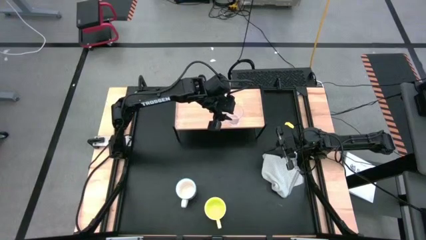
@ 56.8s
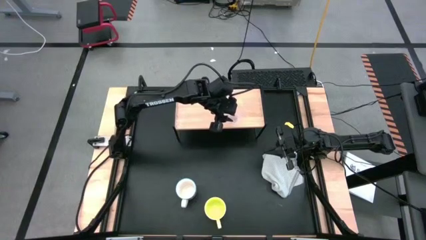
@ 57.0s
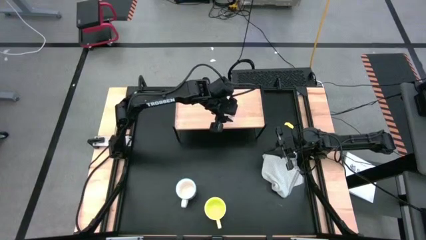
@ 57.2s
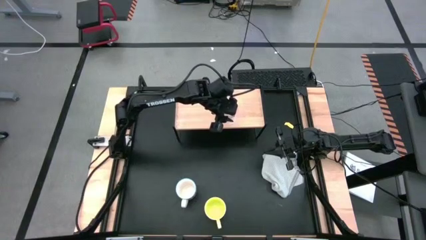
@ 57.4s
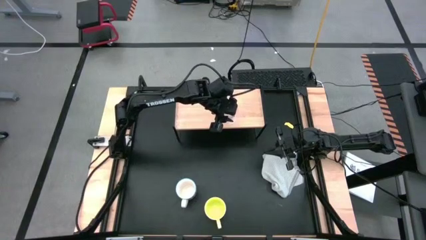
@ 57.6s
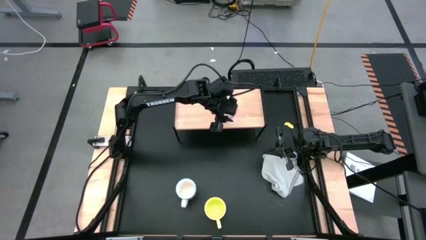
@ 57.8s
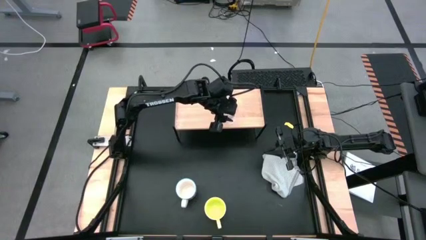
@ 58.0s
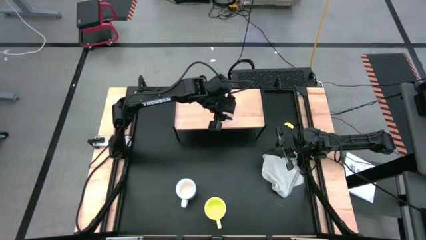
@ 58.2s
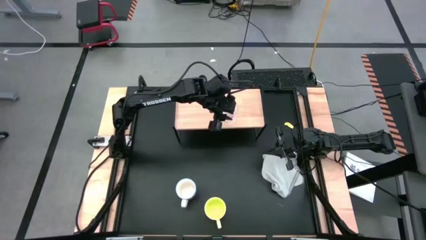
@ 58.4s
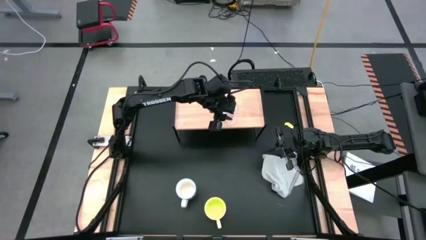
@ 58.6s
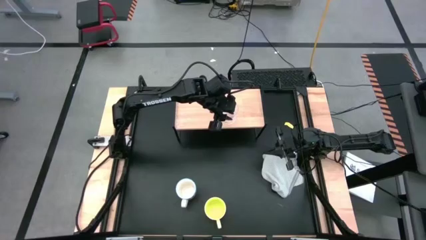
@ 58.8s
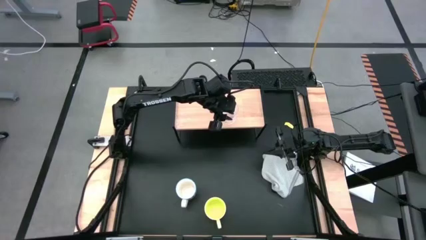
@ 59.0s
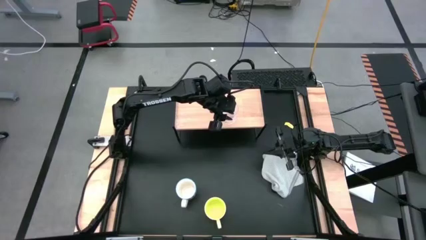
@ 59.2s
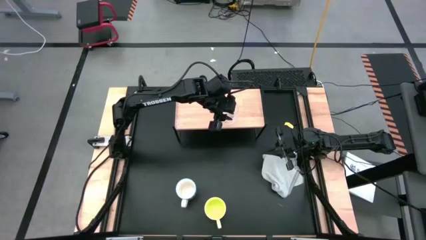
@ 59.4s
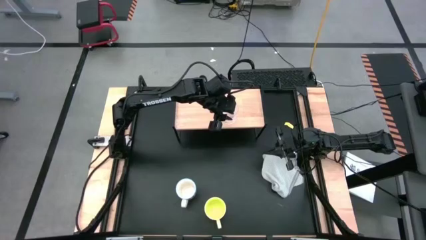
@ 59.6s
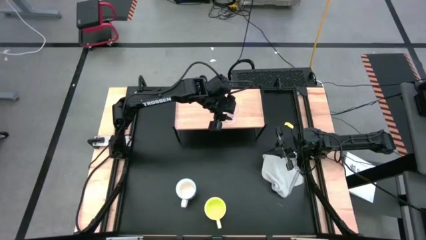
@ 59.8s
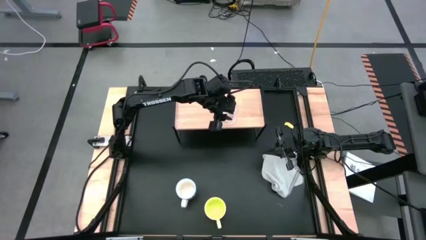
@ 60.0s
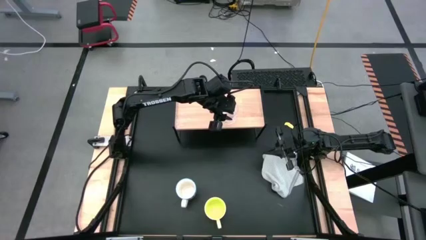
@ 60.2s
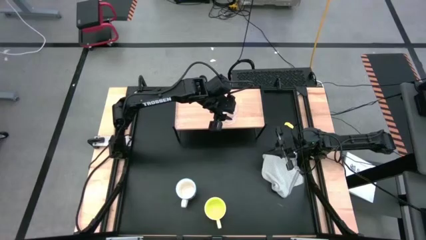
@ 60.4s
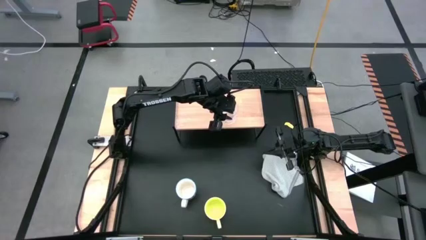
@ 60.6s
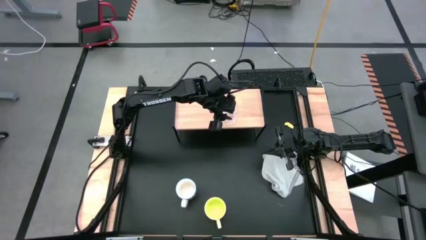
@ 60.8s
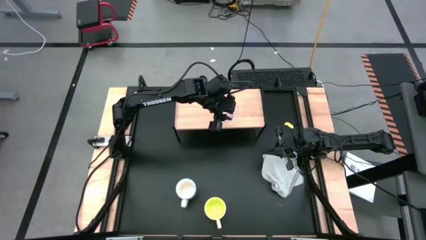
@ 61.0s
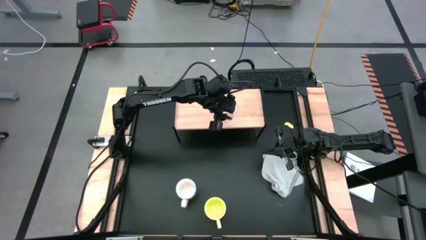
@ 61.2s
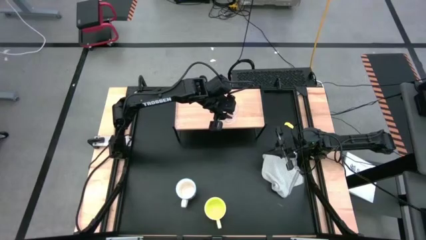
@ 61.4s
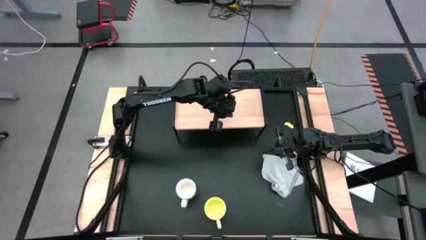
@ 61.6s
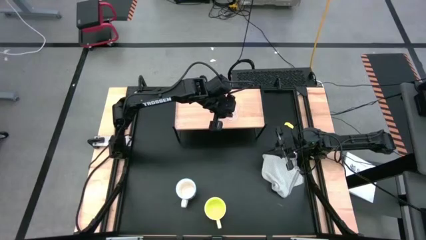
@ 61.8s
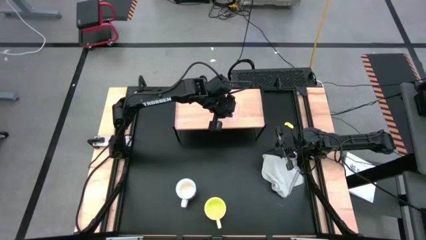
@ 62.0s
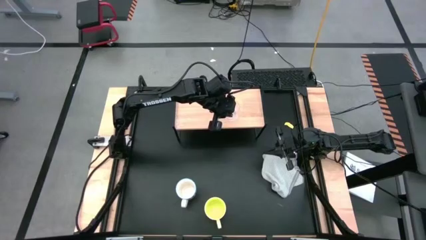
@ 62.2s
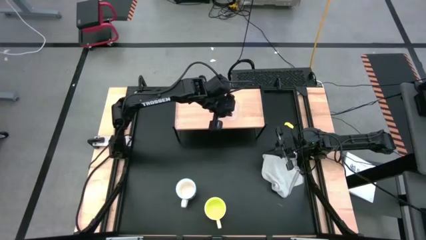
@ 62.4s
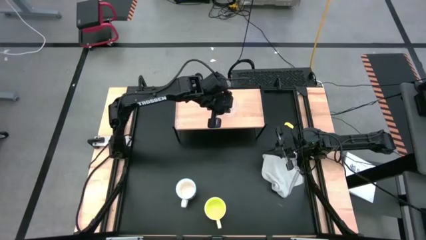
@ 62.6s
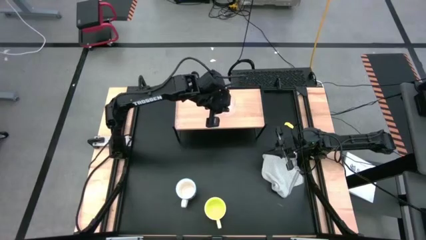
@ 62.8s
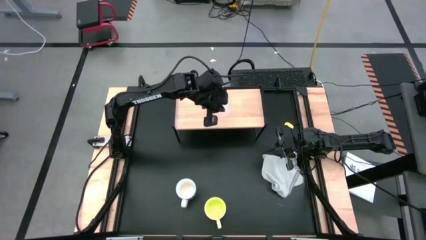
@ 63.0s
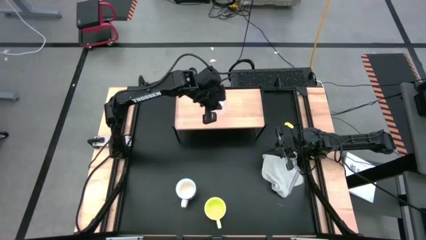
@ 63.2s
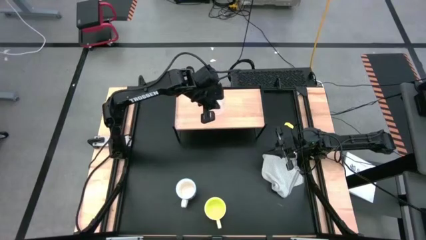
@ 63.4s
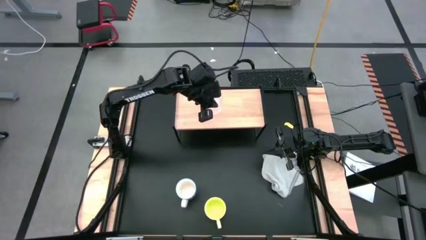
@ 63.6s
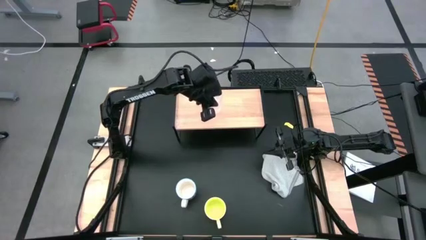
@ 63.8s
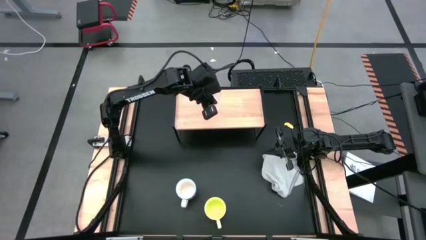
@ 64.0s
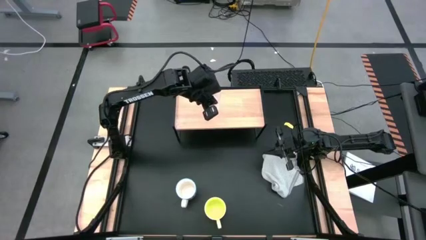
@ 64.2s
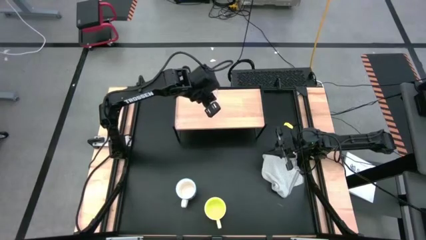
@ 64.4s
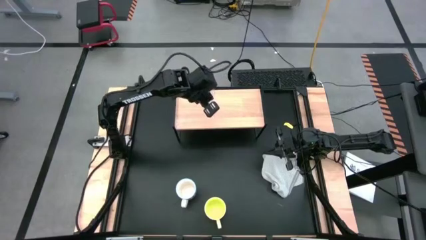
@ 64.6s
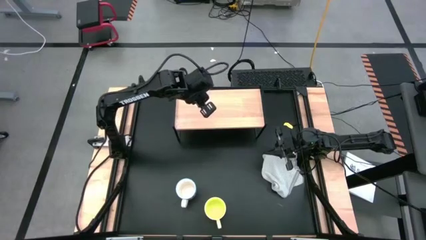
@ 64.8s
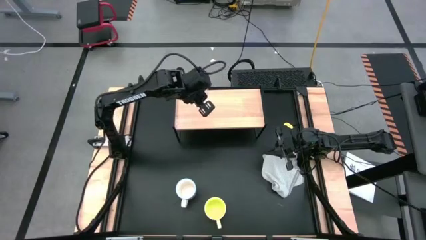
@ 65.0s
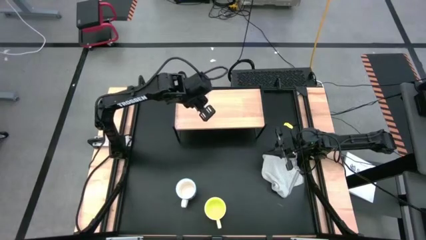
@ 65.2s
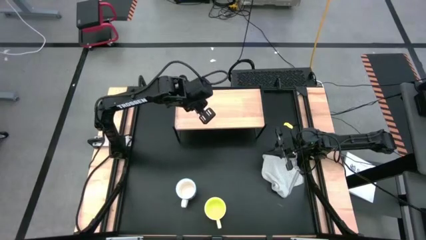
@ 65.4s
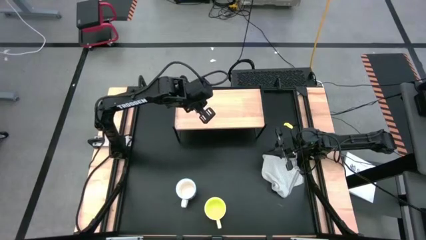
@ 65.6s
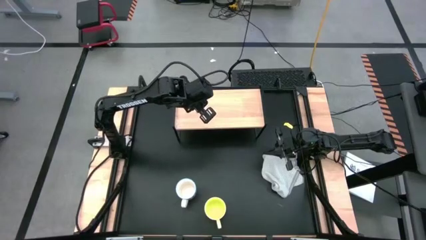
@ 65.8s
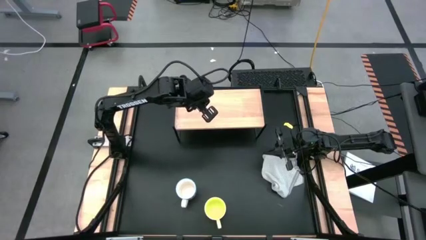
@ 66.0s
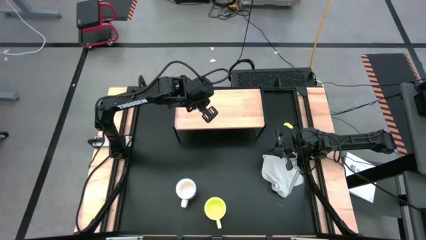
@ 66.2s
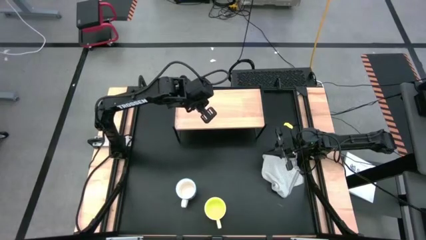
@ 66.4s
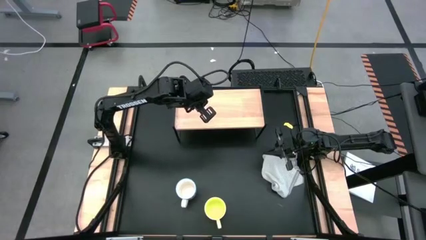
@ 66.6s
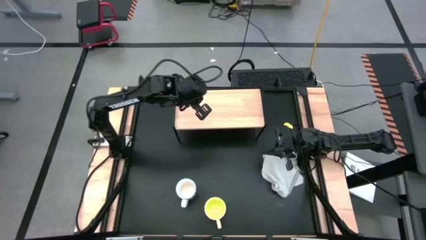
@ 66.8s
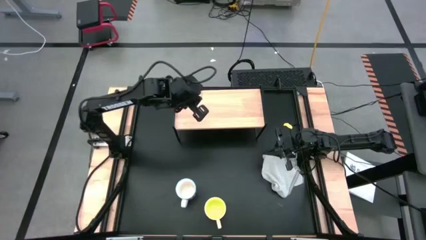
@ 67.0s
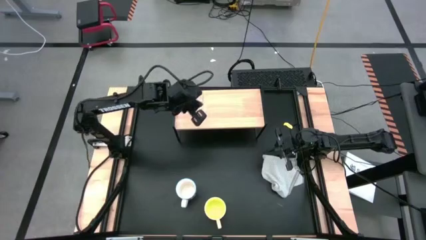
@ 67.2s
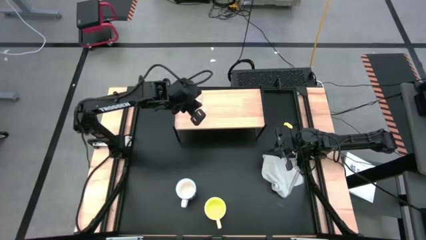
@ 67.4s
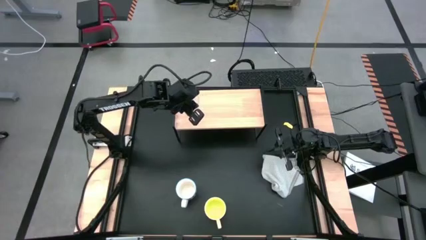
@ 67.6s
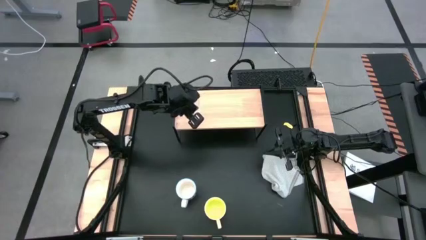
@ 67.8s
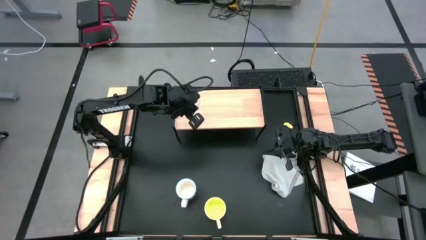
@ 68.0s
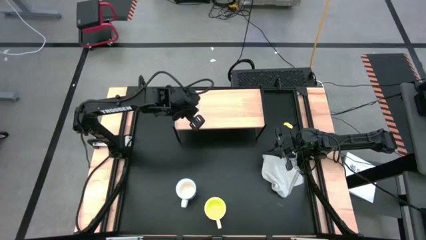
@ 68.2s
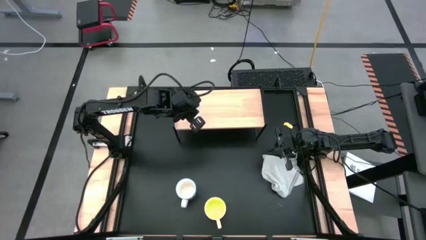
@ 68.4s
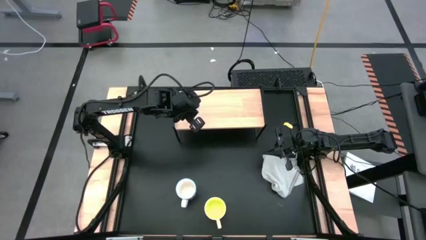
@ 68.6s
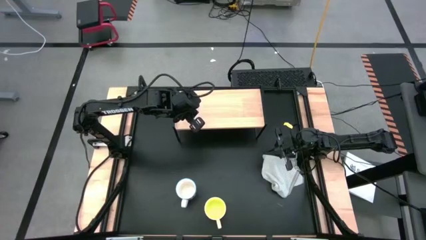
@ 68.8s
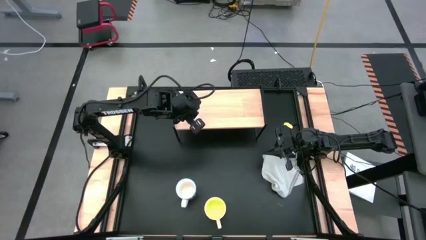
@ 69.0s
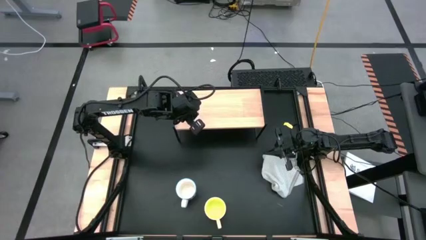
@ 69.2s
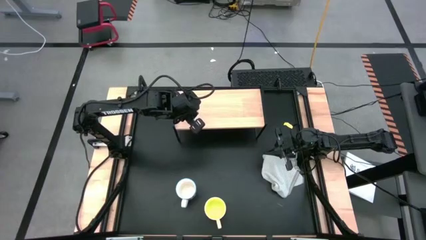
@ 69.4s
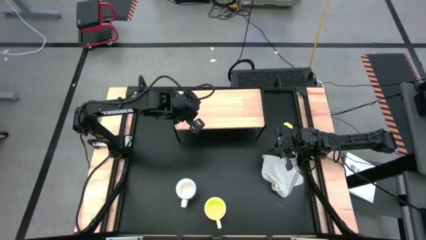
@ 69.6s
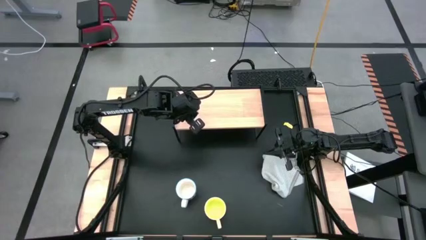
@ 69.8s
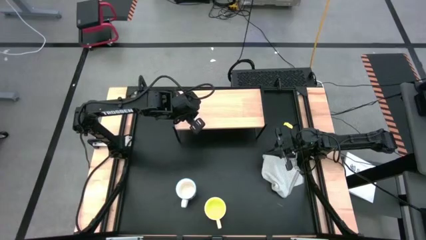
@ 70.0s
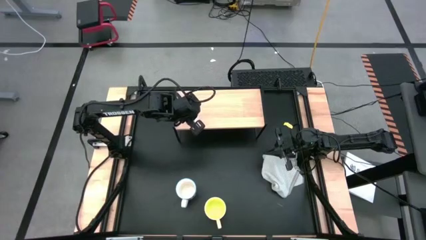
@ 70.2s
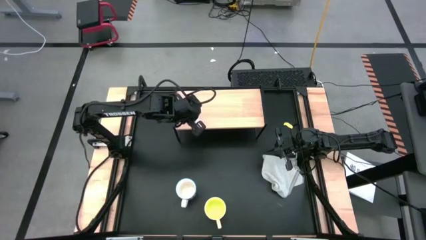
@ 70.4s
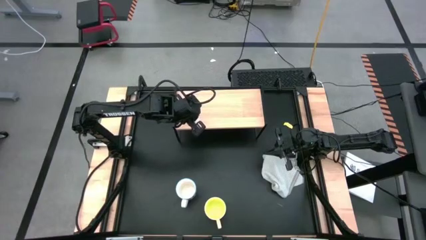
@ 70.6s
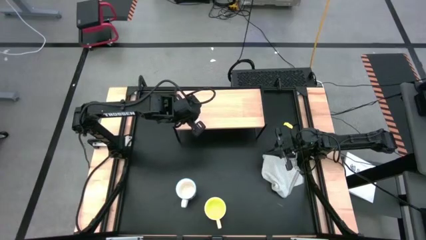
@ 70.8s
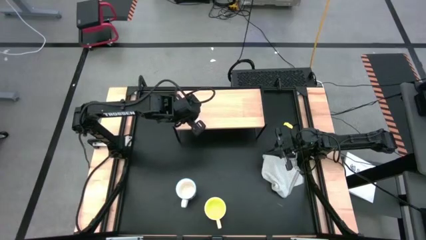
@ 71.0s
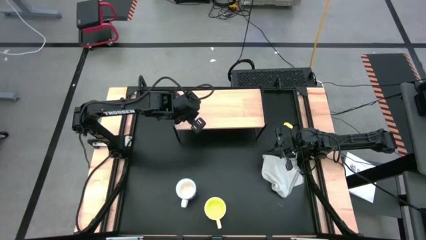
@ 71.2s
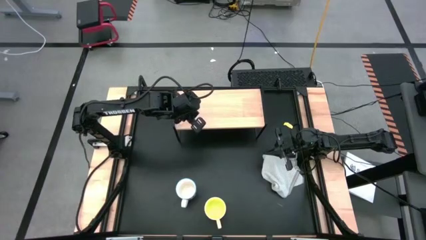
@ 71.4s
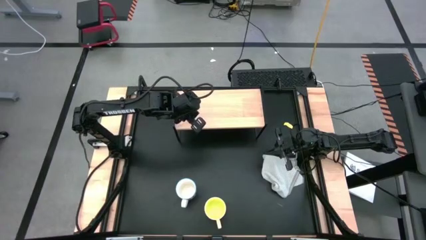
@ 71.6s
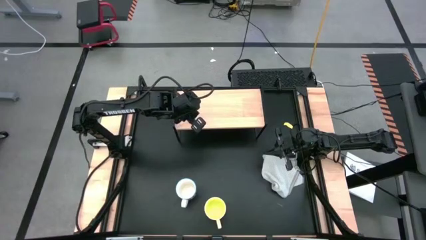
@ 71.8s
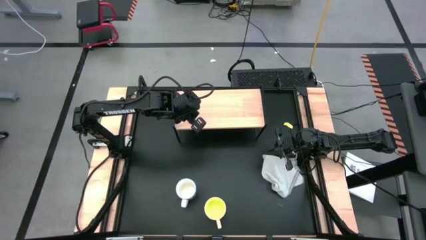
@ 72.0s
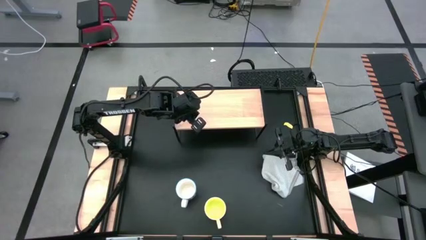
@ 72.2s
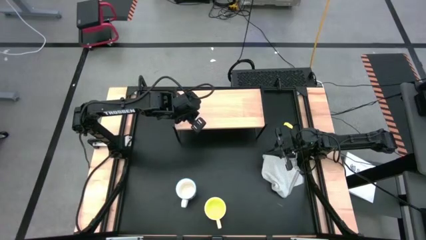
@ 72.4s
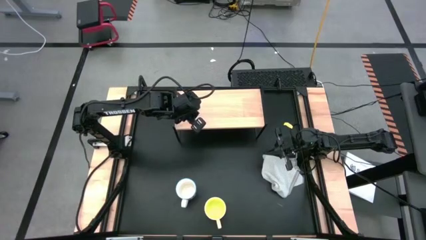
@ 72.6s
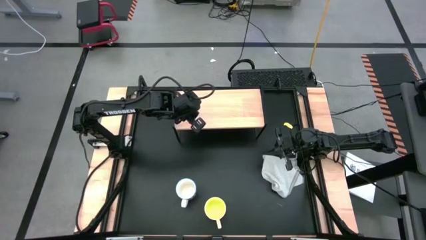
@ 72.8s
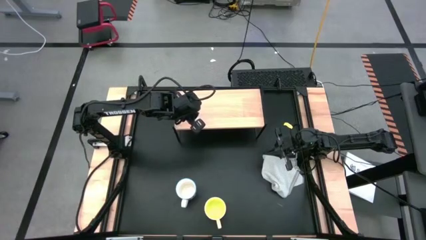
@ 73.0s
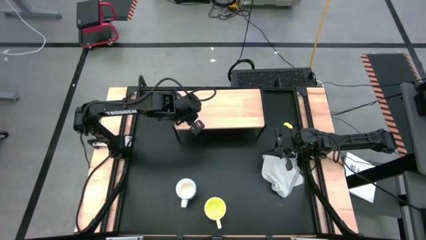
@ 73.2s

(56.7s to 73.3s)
Task: Stack small to large cups/mugs on shelf
Put the transparent mug on the shelf
